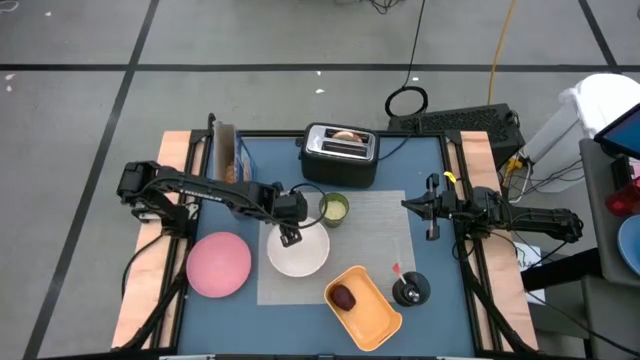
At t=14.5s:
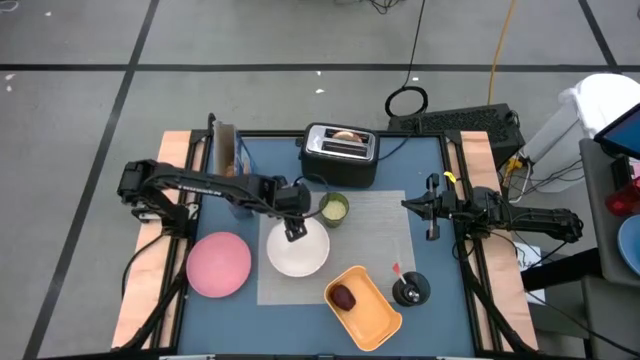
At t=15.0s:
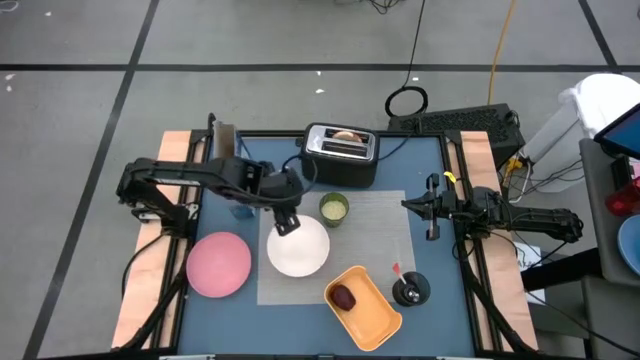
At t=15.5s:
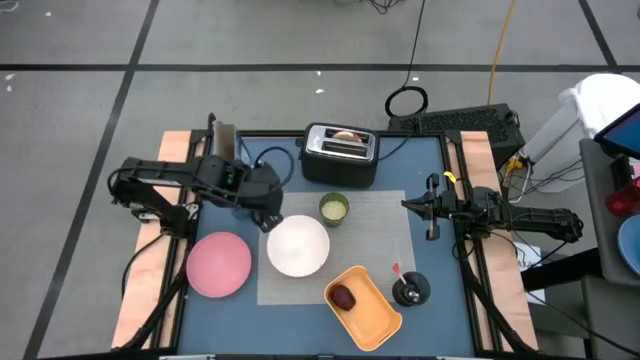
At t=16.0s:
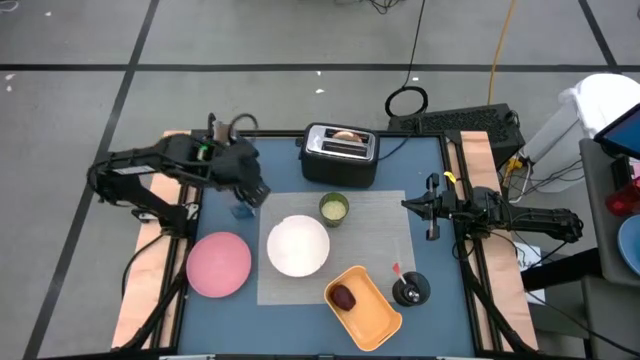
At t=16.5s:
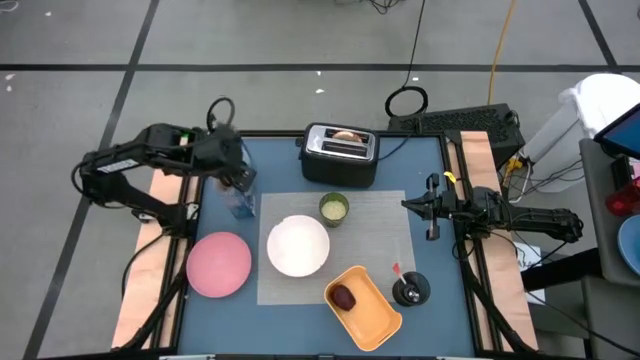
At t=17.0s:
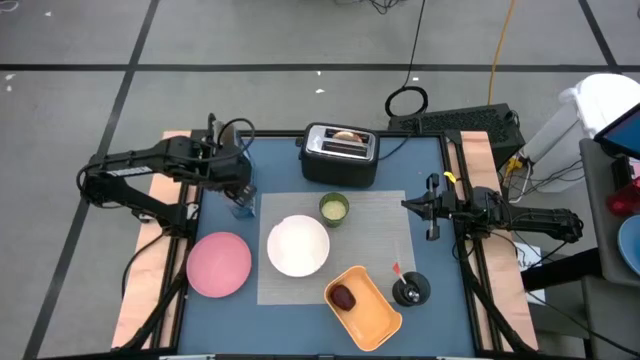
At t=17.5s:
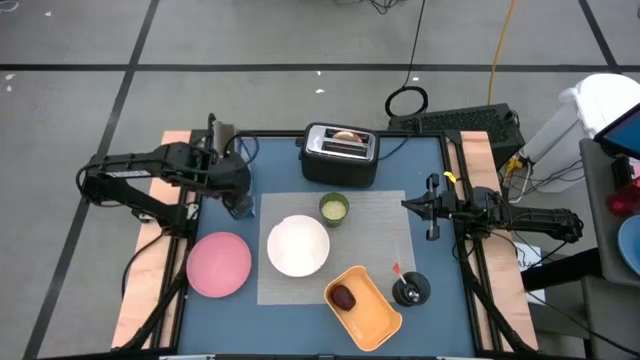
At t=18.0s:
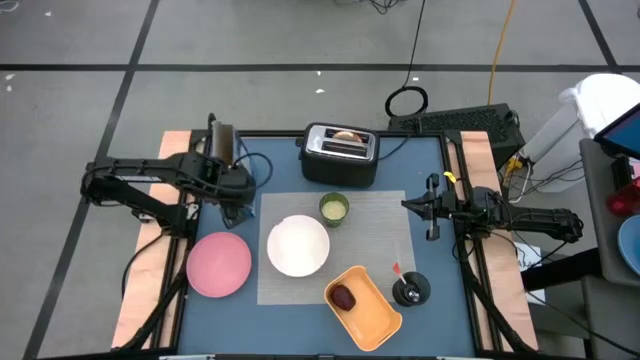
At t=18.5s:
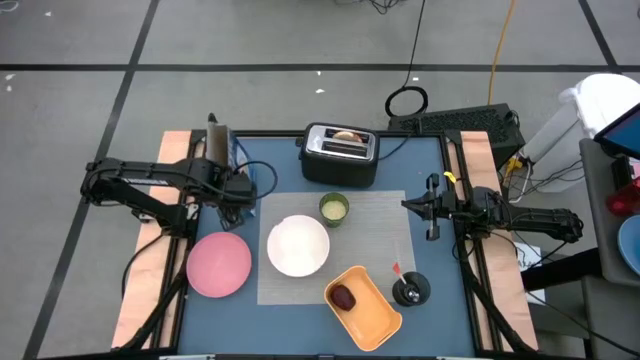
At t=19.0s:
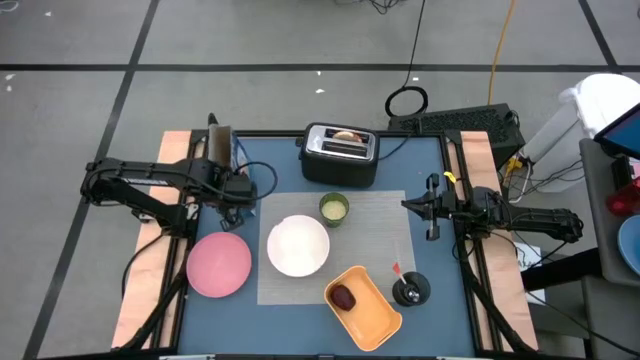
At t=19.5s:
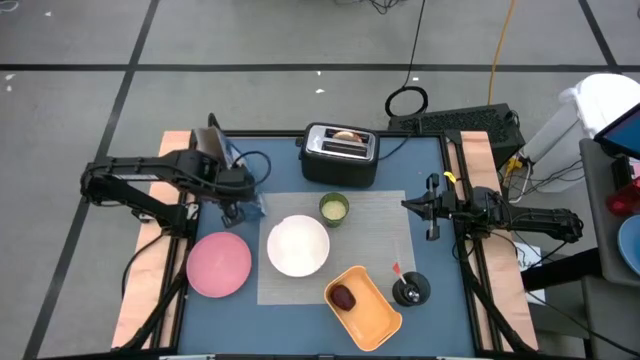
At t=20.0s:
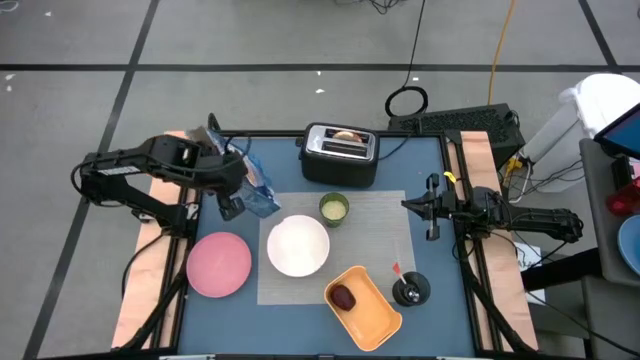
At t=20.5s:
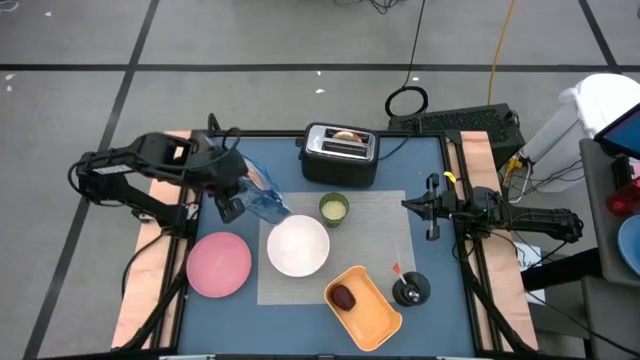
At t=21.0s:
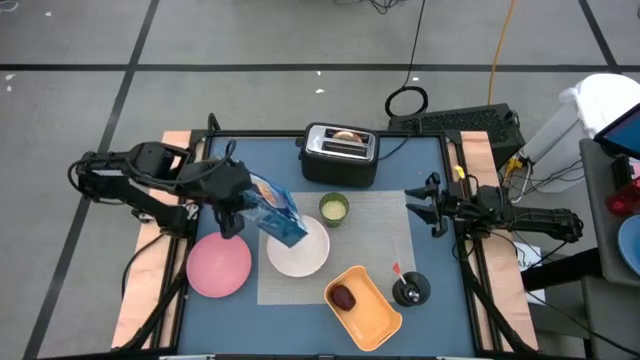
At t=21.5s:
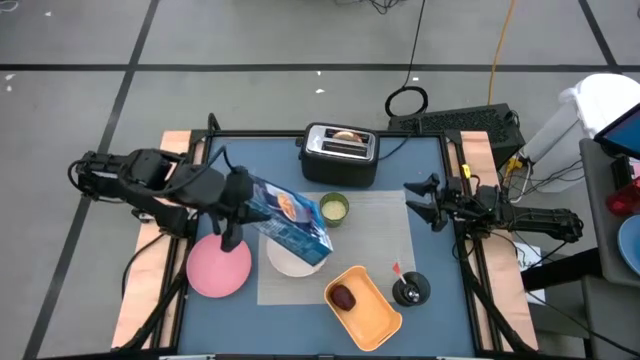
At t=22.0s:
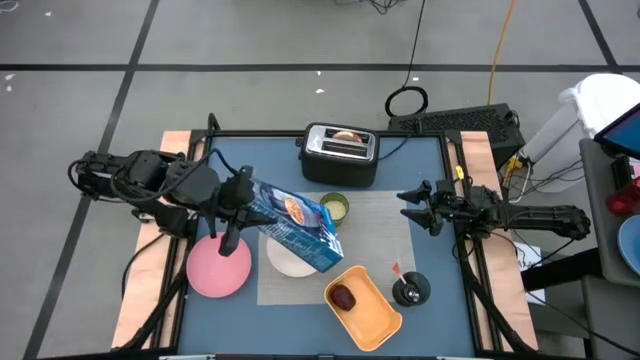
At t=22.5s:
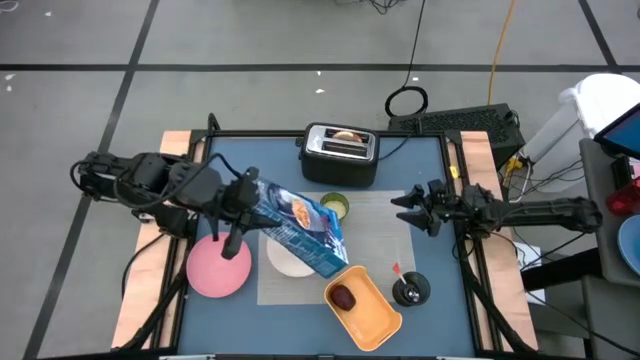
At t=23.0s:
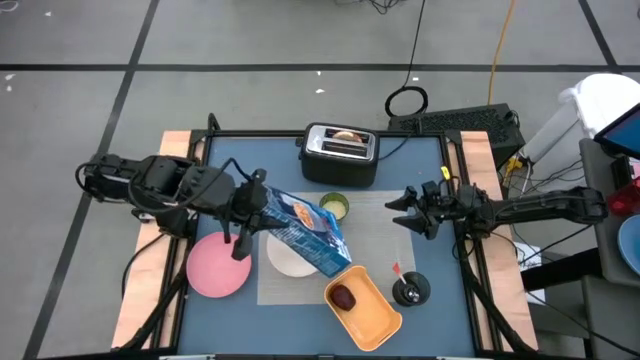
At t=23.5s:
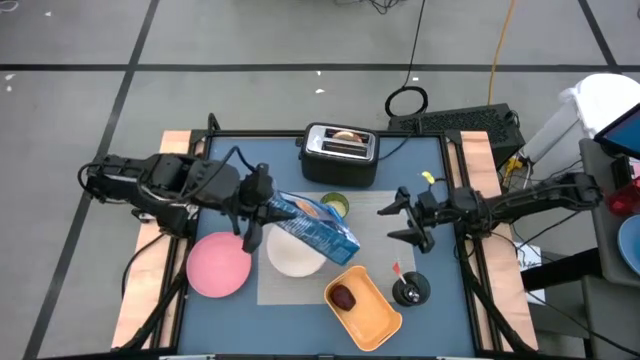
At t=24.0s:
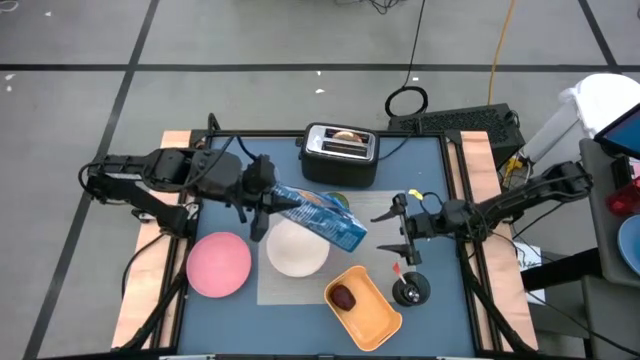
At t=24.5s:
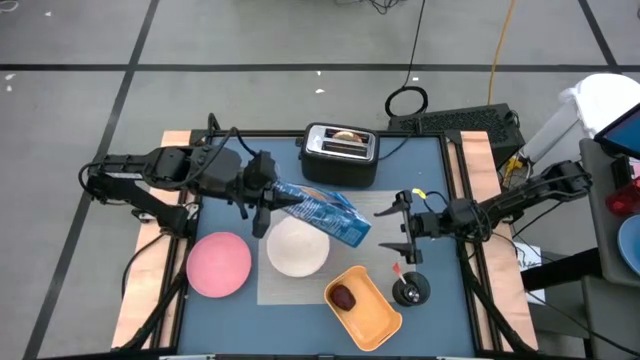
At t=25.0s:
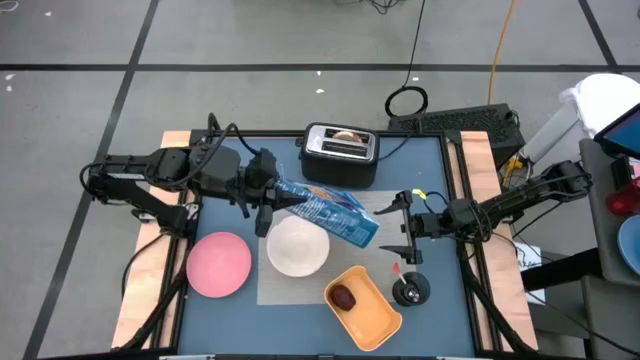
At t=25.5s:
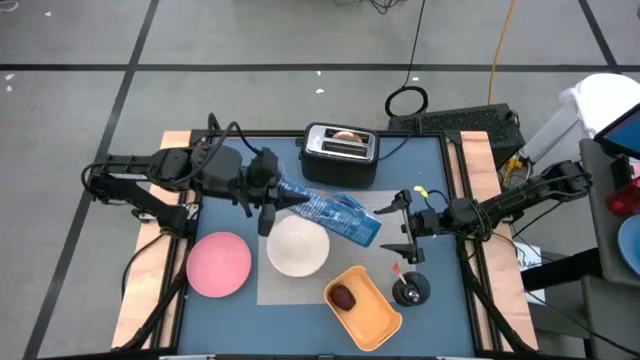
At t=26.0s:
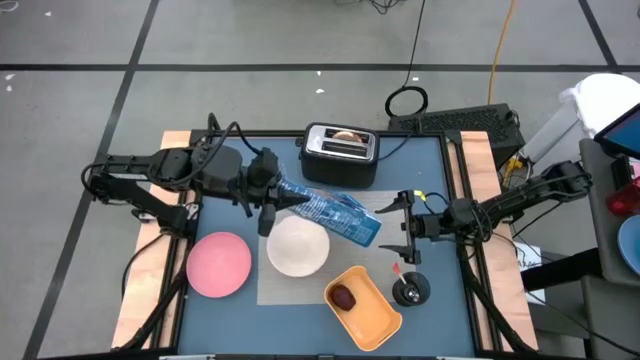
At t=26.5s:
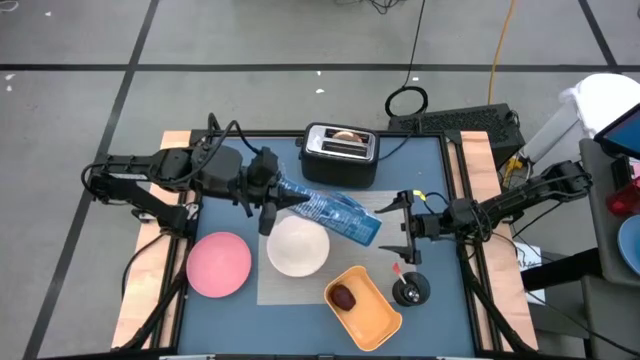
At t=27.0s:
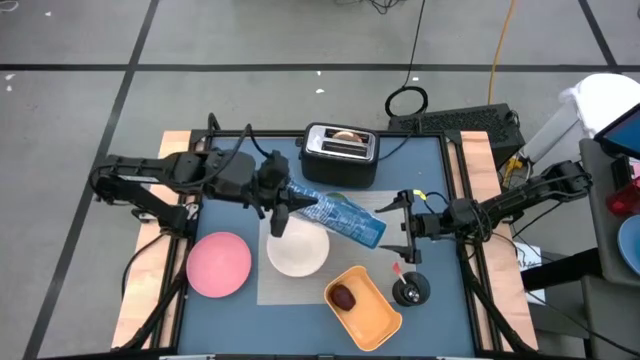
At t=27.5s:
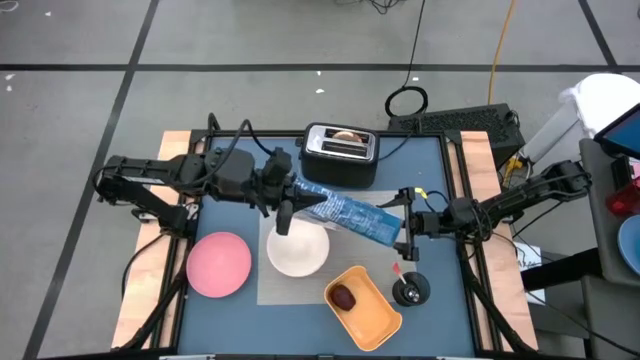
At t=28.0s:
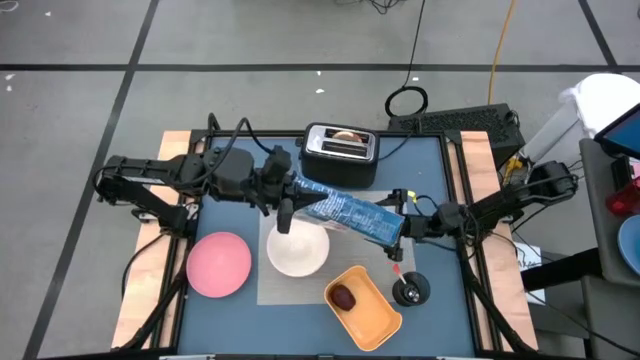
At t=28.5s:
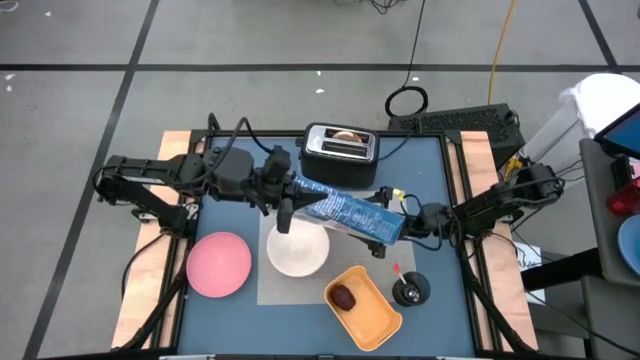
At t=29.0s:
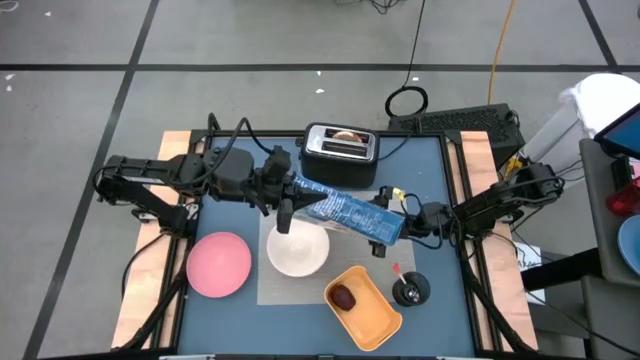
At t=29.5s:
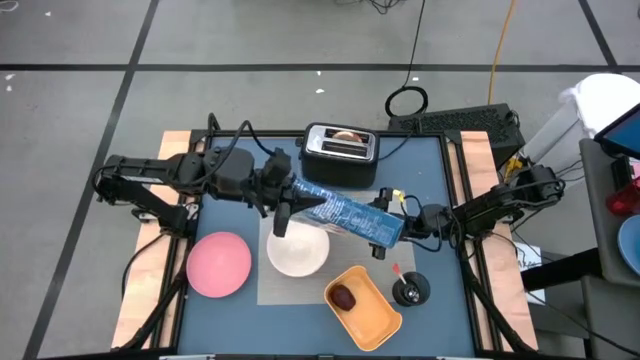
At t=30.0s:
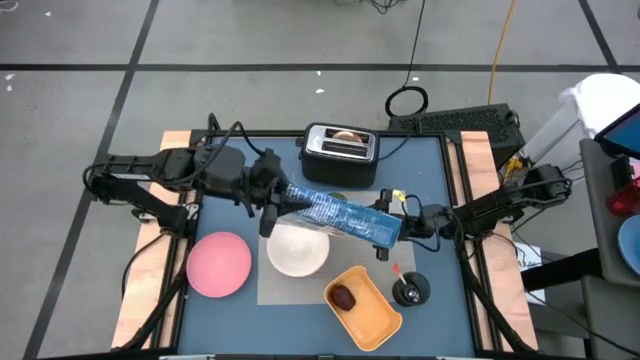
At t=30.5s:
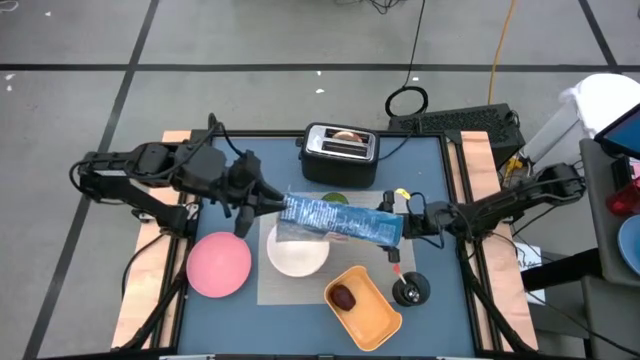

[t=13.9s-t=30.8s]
Task: Arrange a breakfast setting
Pour the cereal into the white bowl

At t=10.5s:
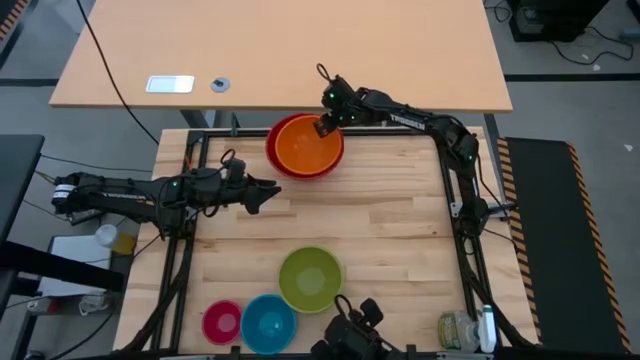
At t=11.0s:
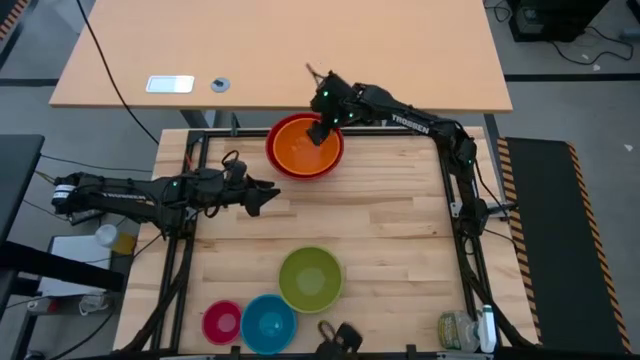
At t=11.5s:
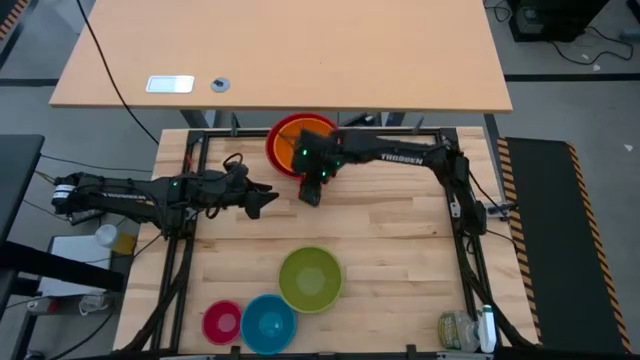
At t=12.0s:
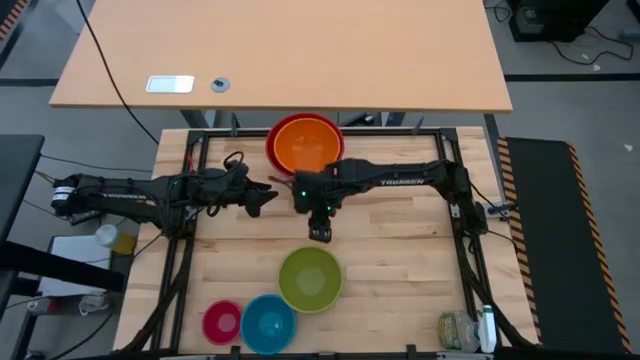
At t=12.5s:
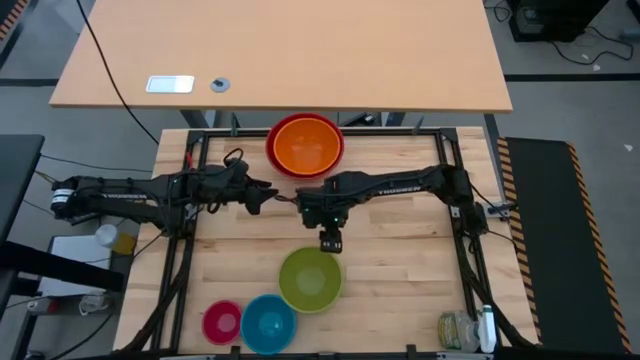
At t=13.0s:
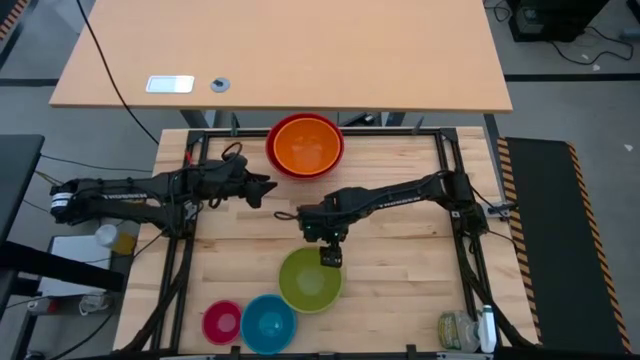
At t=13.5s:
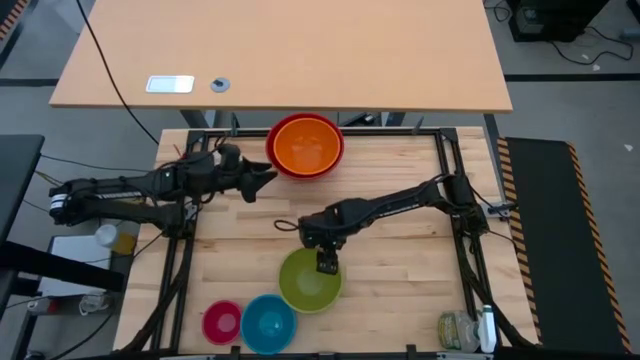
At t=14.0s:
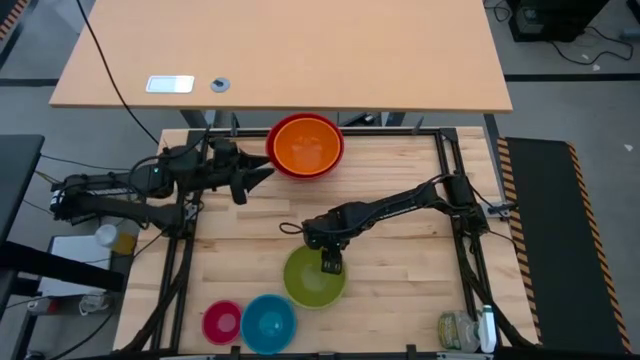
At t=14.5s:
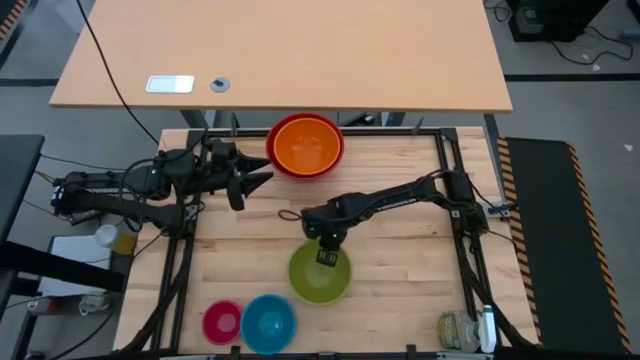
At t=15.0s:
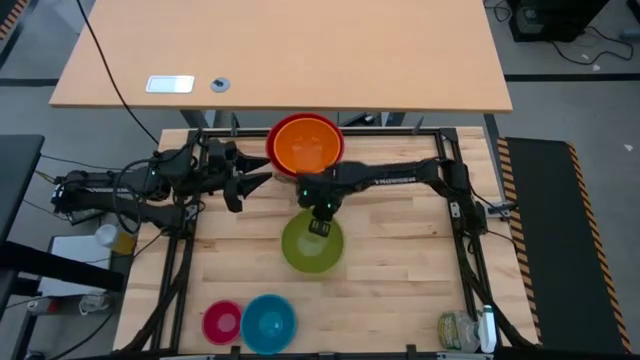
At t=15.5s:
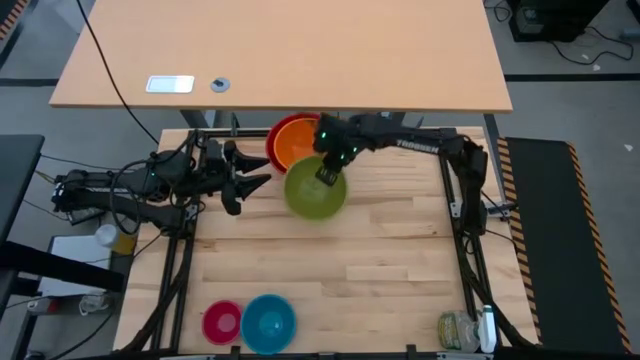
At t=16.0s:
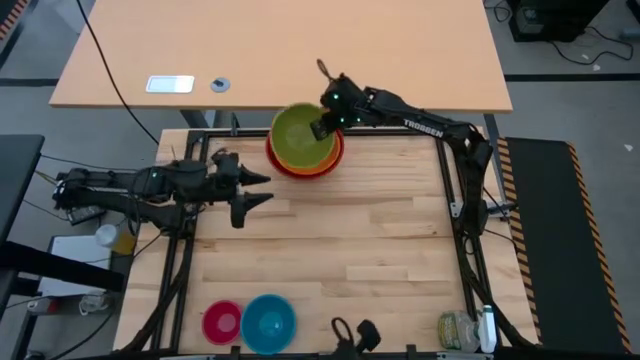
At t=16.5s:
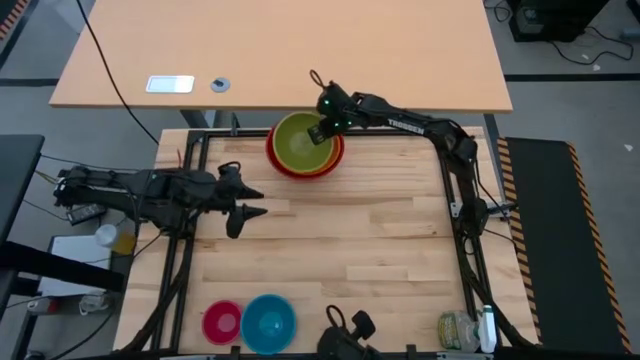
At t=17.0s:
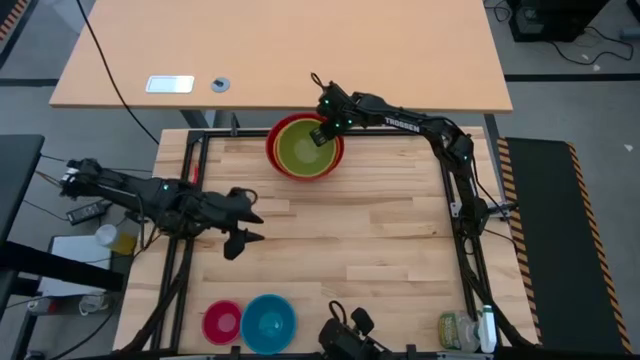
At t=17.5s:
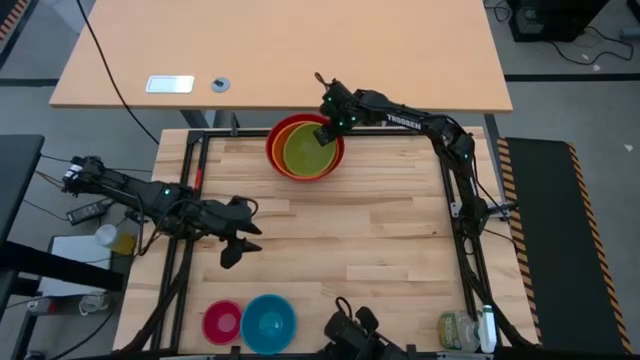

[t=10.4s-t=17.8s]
Task: Nest bowls inside each other by size order
Stack the green bowl on the orange bowl
